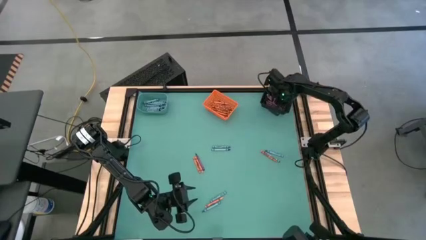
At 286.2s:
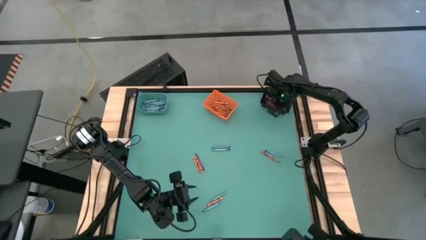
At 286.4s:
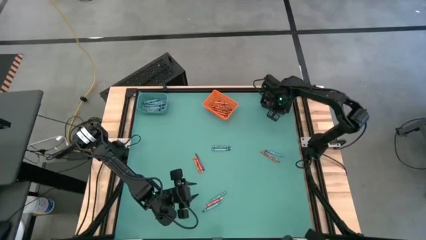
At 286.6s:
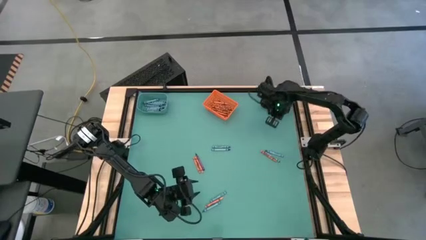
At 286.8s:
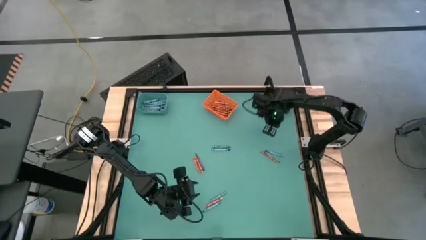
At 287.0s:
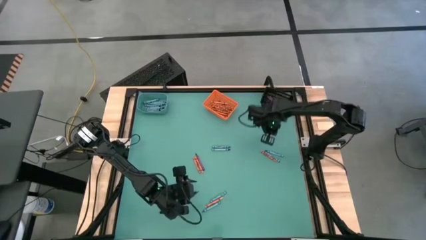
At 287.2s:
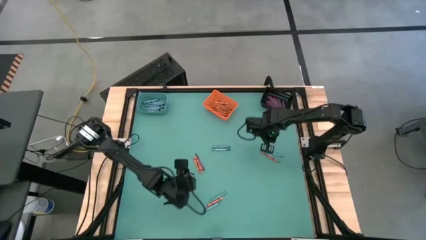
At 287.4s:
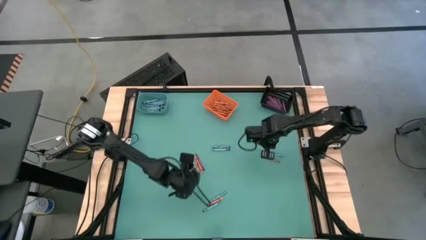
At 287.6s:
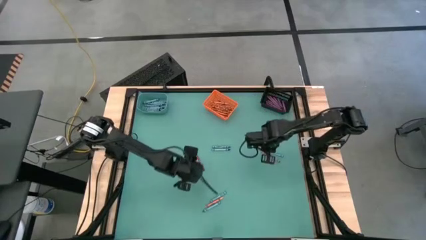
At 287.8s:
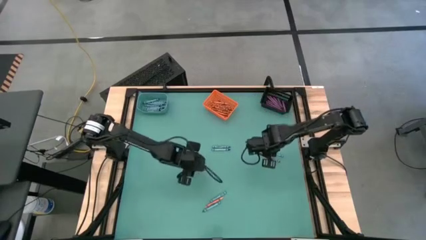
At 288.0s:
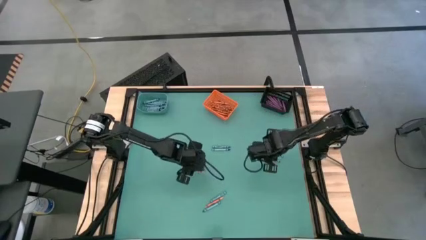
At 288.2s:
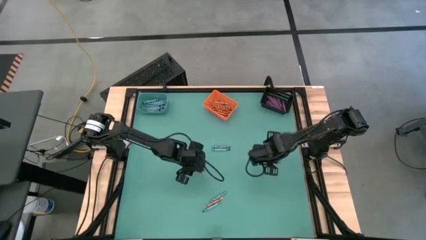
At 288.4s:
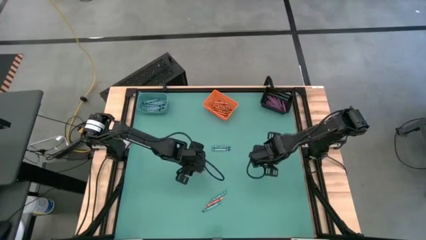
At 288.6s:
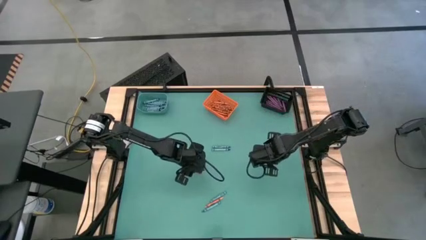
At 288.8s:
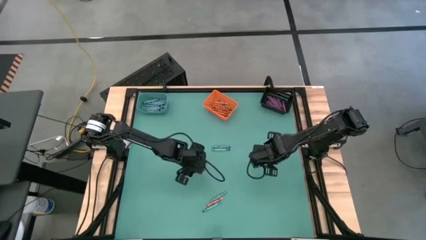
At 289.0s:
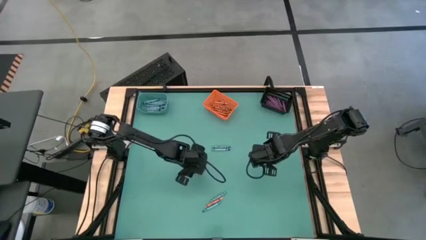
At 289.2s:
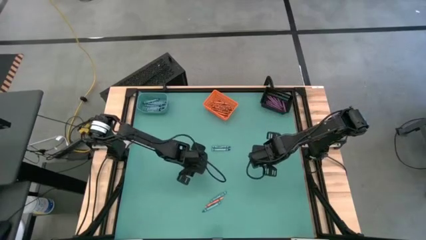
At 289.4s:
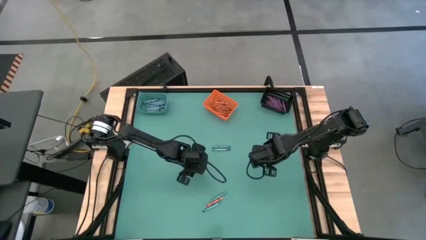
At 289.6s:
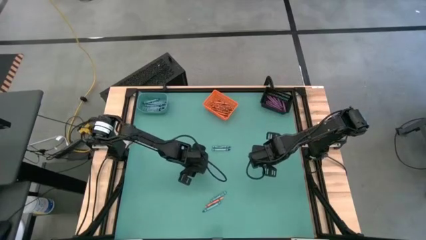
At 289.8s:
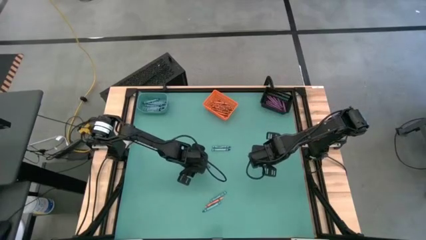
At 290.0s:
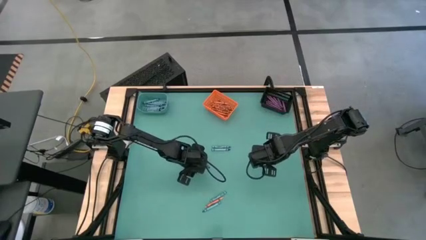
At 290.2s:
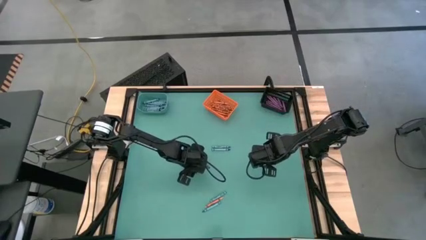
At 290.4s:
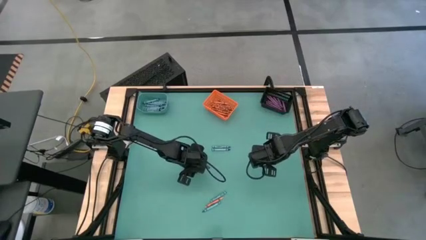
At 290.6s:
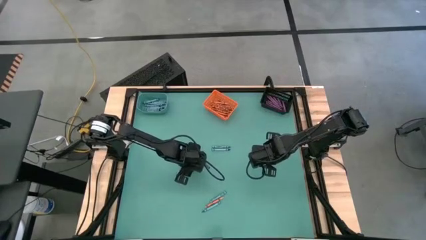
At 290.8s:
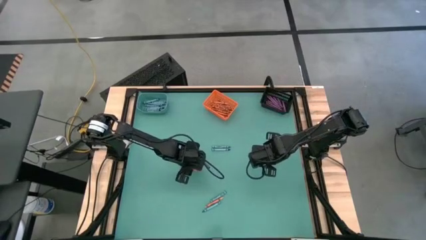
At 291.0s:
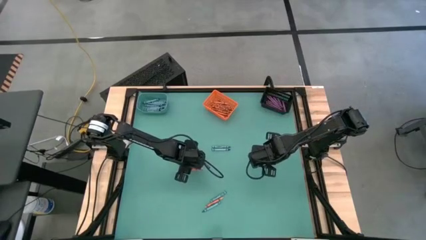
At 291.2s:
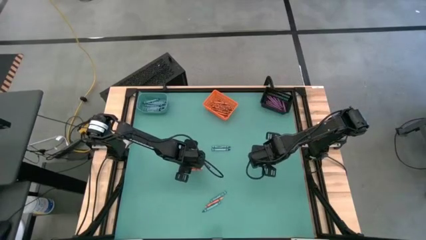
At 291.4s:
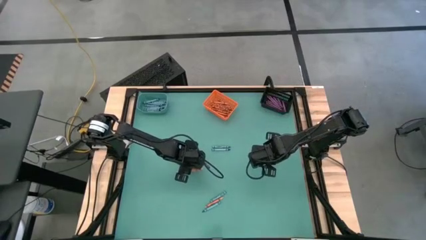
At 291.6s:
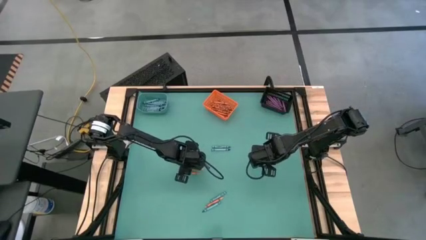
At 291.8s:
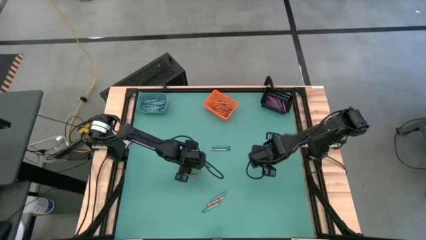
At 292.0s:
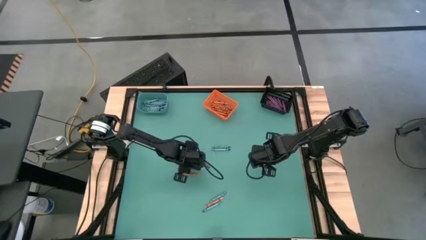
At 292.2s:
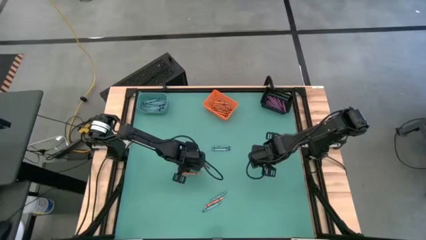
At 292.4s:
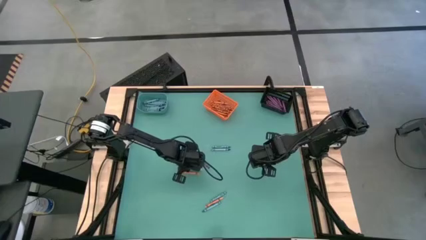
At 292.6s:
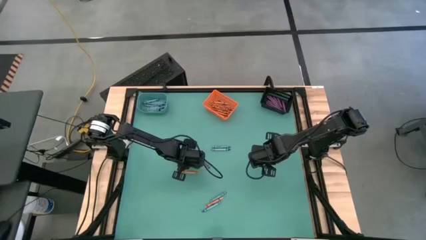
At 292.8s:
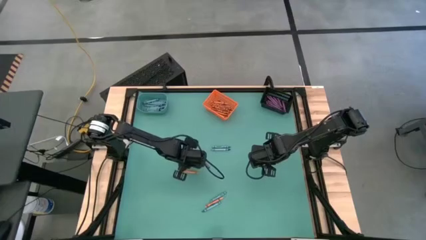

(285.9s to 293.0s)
Task: Sort crayons
Put the orange crayon into the orange bin

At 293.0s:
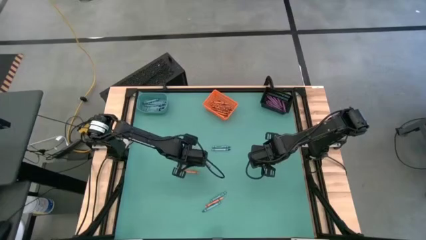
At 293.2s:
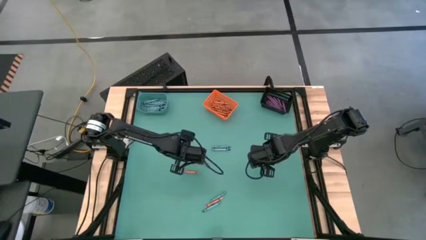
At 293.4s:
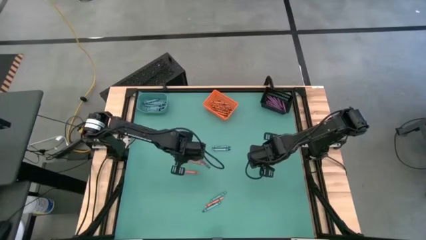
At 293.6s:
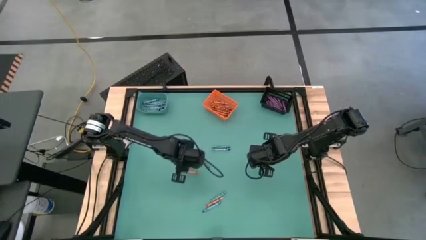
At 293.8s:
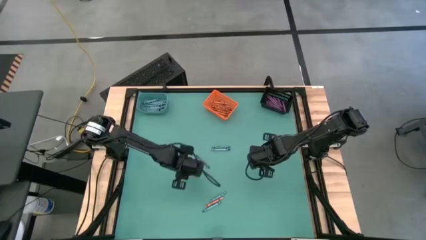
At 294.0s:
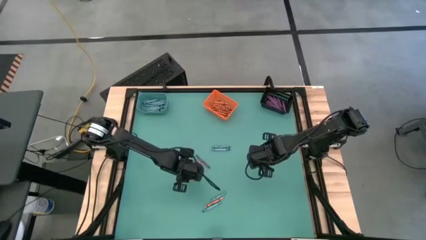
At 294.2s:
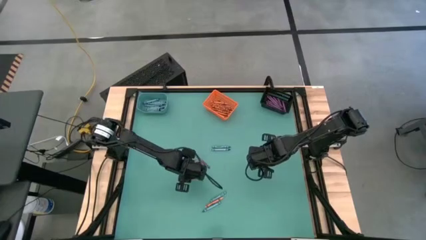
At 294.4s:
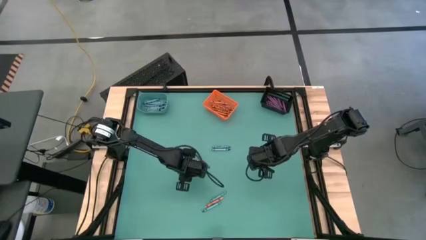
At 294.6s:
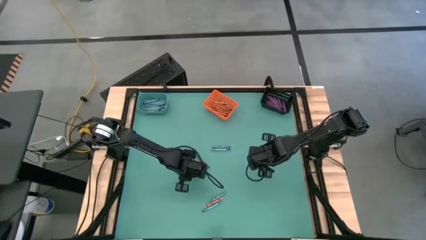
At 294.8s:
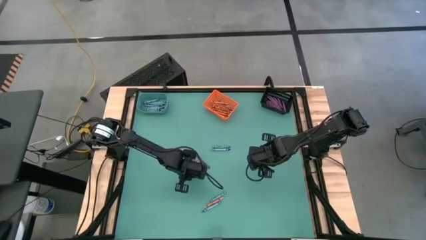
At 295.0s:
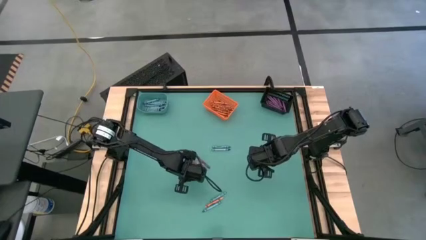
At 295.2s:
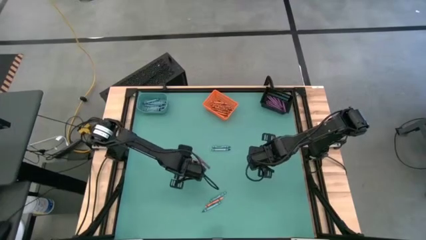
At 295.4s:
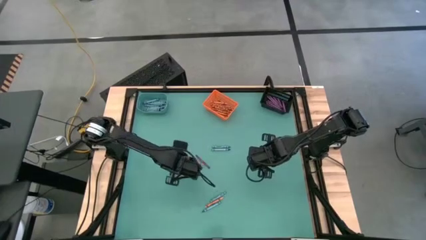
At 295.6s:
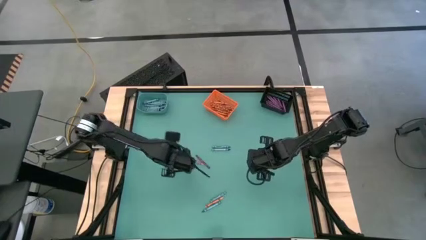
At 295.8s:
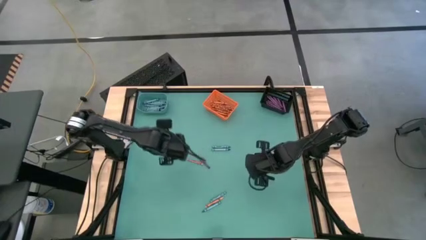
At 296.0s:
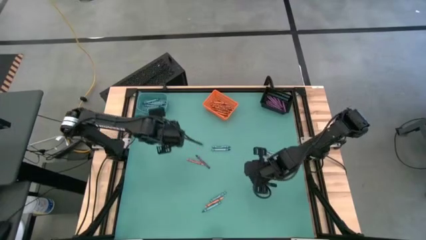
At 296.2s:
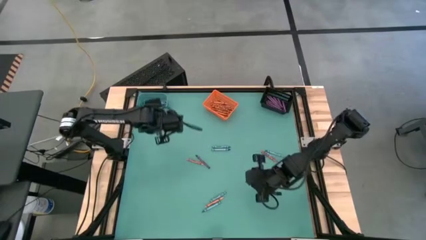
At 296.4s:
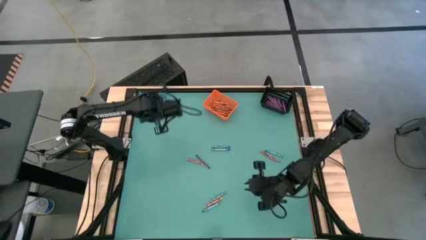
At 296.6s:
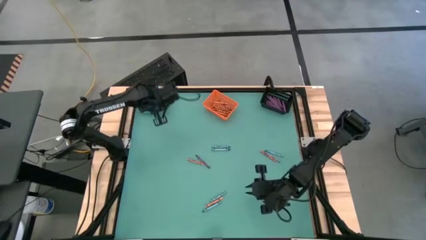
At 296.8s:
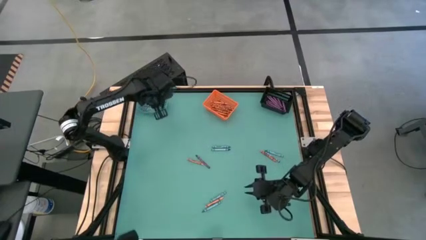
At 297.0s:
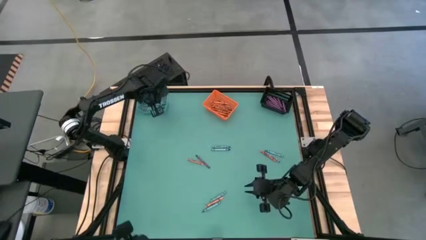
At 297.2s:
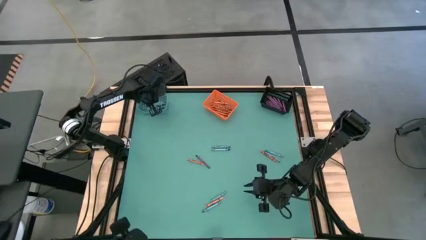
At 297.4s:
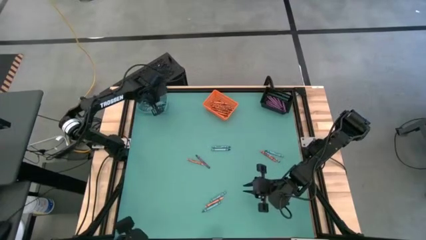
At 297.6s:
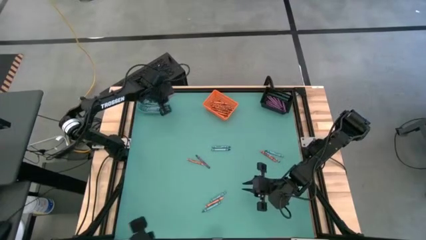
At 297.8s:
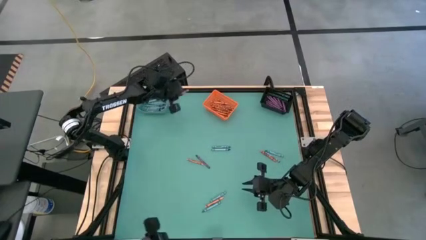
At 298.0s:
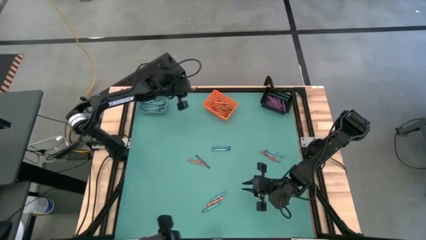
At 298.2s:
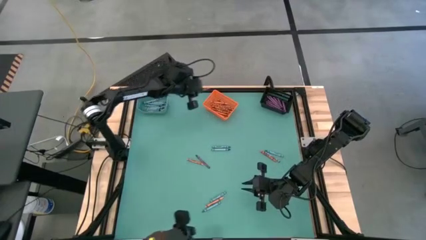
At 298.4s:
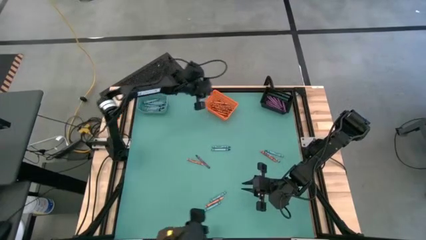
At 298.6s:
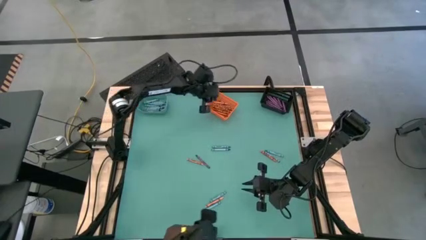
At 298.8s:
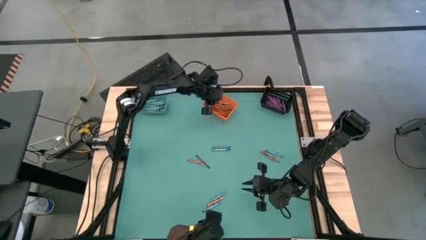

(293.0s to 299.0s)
Put the orange crayon into the orange bin

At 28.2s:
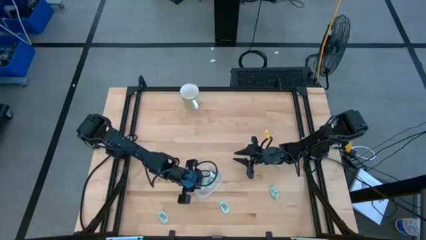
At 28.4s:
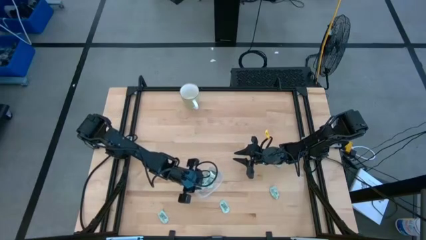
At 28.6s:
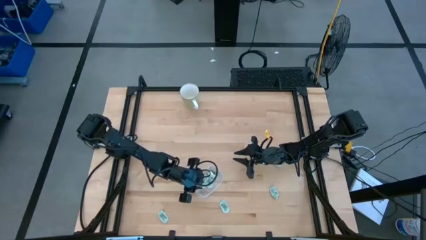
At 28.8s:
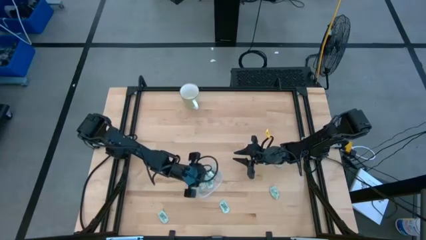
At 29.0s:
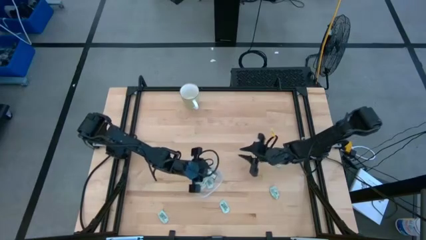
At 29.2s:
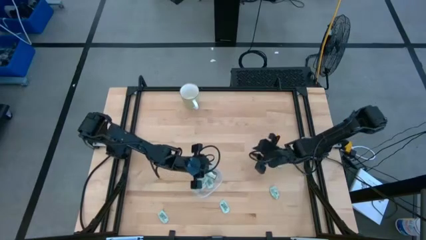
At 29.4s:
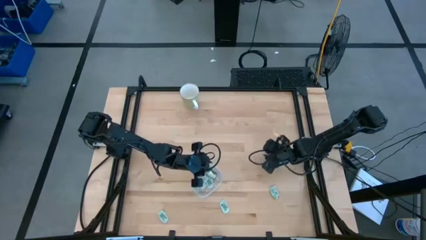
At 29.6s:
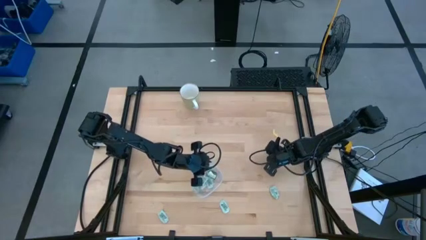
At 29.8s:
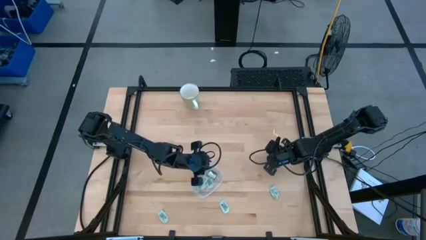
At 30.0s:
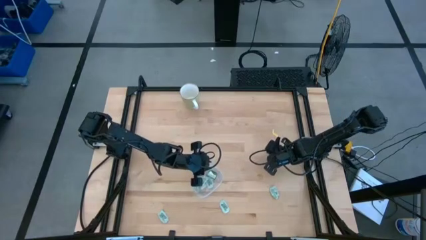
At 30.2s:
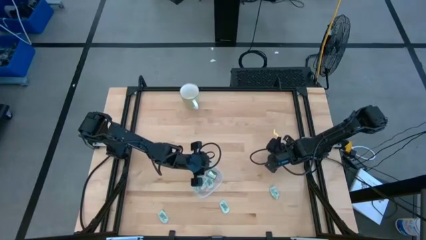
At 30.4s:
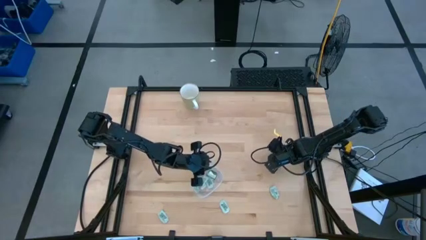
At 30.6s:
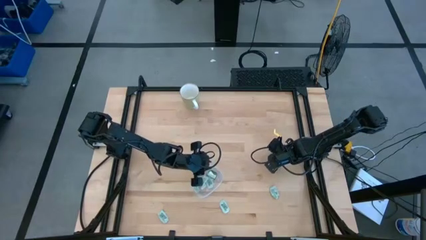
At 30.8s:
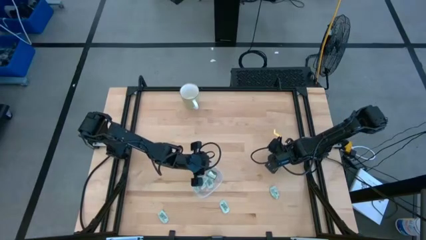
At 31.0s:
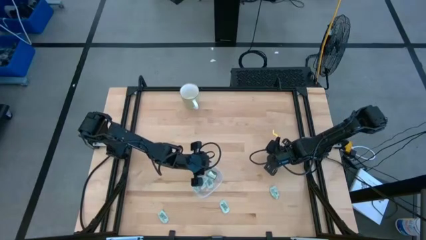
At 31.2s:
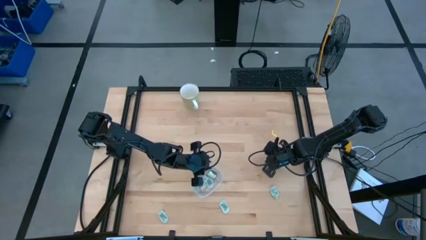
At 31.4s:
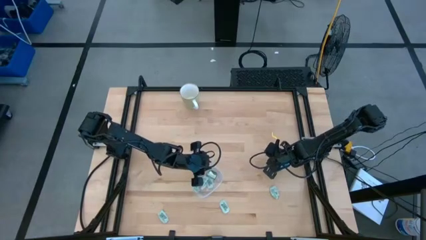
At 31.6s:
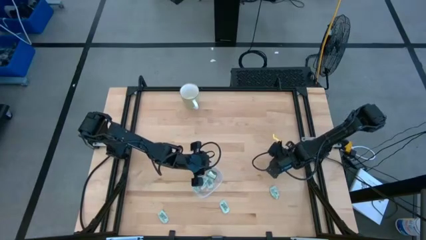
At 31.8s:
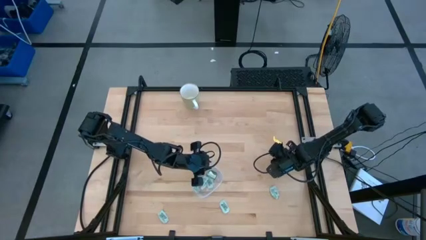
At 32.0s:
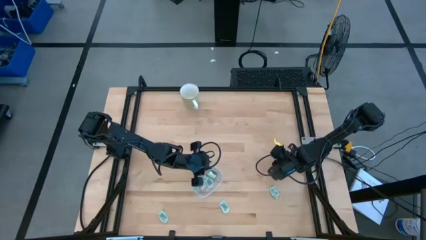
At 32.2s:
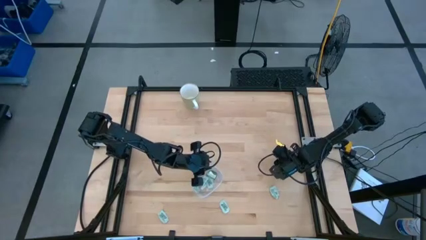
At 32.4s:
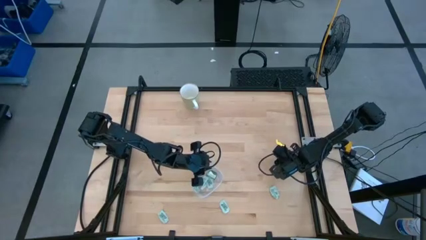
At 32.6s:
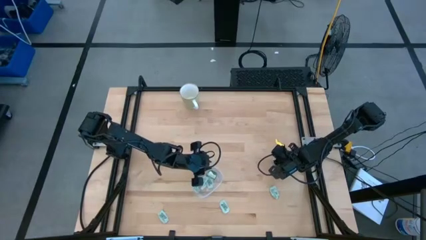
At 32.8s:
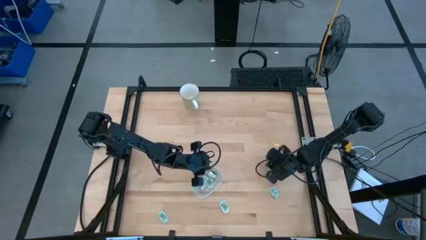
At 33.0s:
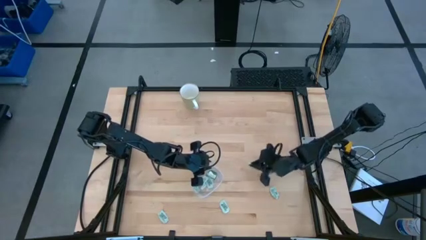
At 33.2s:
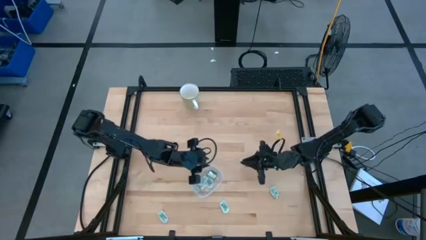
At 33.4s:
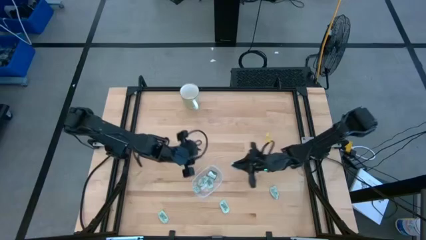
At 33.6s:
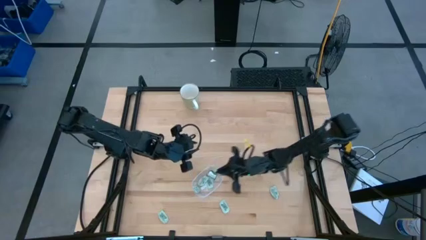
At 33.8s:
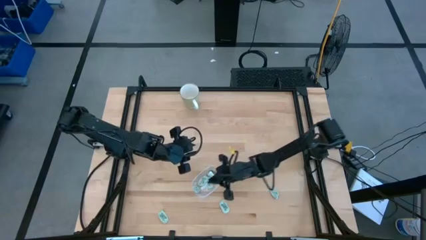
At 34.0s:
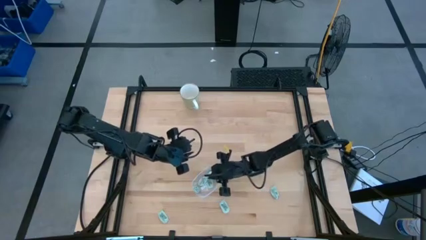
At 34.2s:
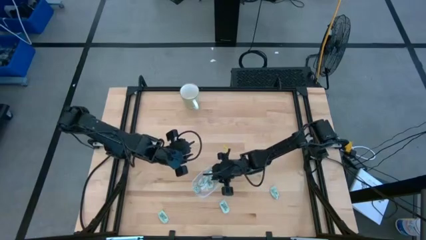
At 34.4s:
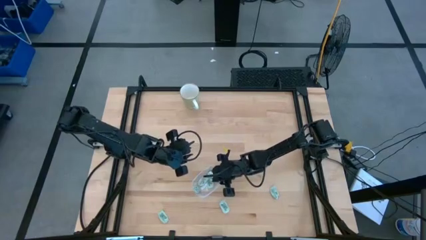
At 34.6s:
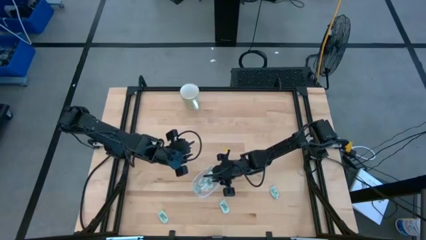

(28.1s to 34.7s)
Task: Pick and place Stevia / Truvia into bins
Put the light green stevia packet into the transparent bin
